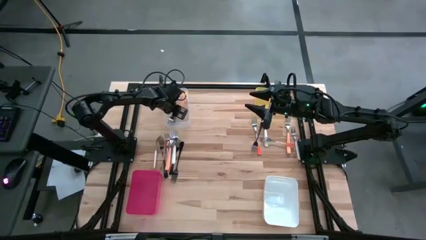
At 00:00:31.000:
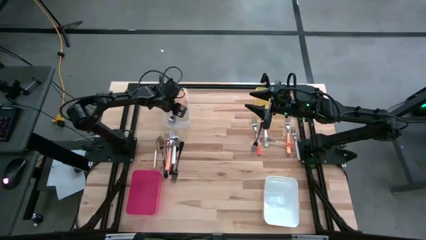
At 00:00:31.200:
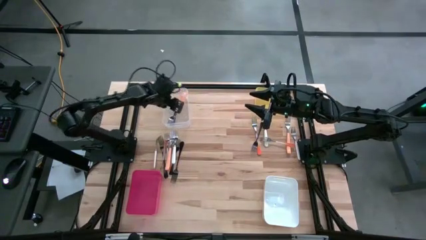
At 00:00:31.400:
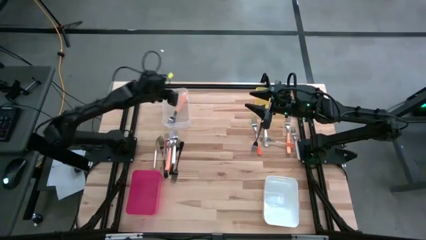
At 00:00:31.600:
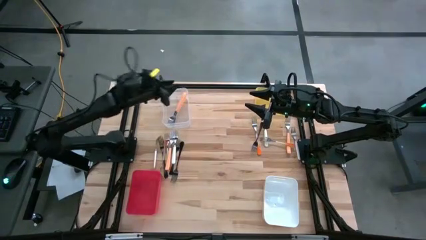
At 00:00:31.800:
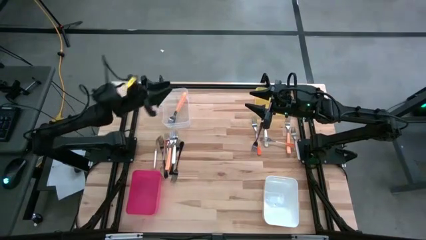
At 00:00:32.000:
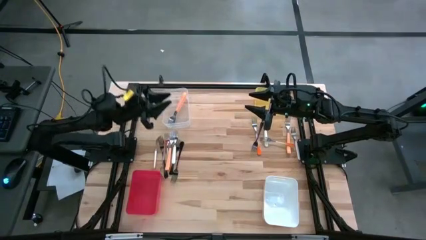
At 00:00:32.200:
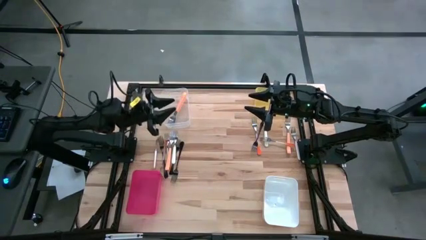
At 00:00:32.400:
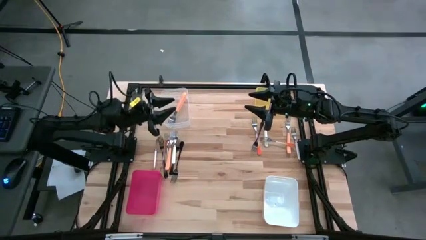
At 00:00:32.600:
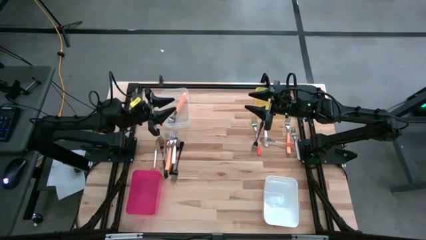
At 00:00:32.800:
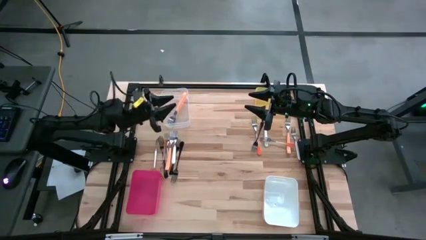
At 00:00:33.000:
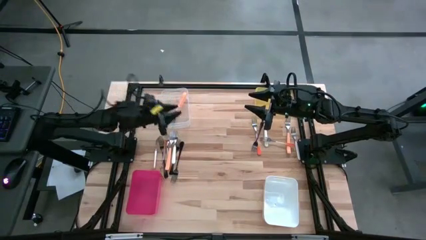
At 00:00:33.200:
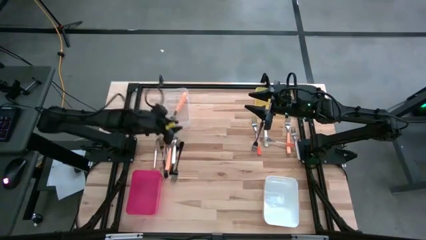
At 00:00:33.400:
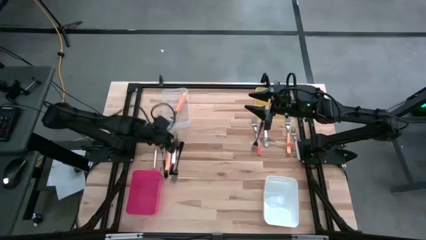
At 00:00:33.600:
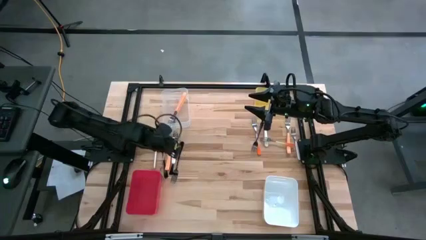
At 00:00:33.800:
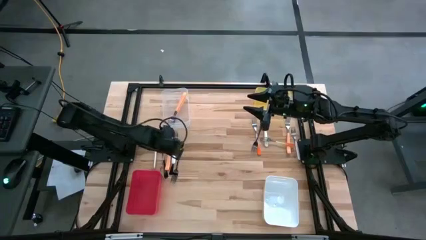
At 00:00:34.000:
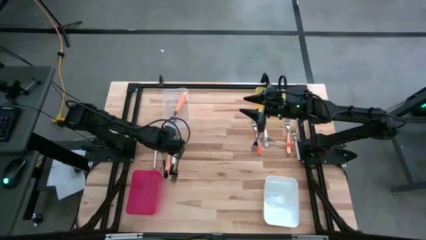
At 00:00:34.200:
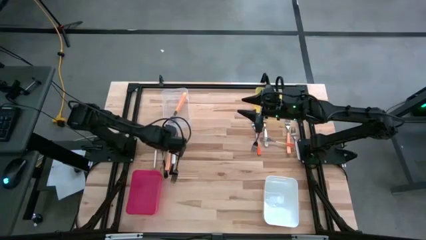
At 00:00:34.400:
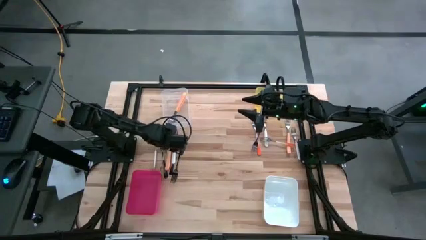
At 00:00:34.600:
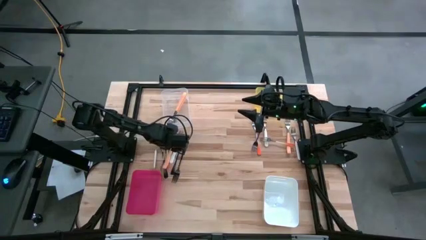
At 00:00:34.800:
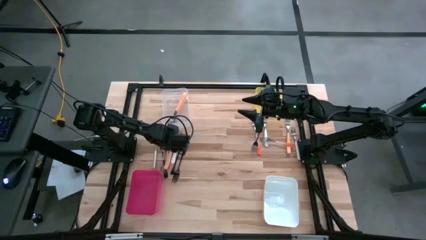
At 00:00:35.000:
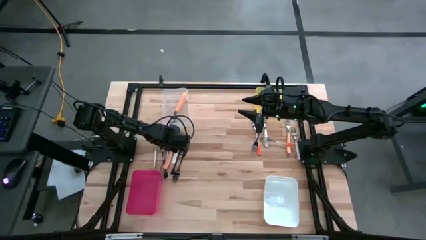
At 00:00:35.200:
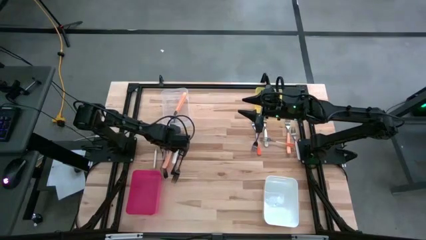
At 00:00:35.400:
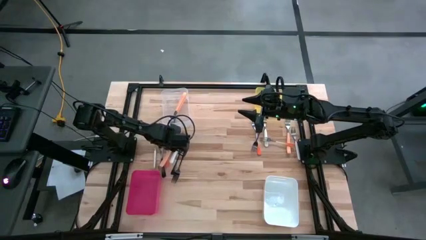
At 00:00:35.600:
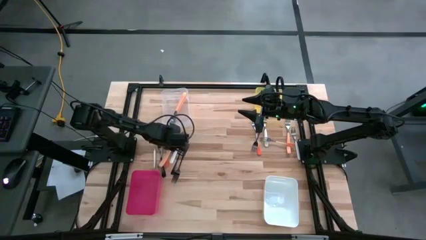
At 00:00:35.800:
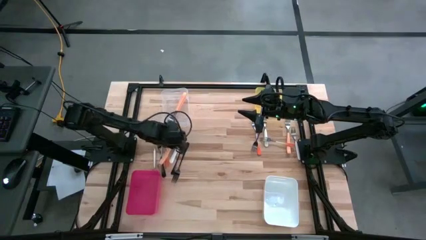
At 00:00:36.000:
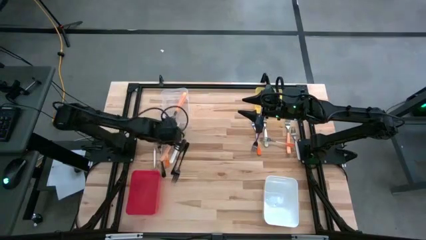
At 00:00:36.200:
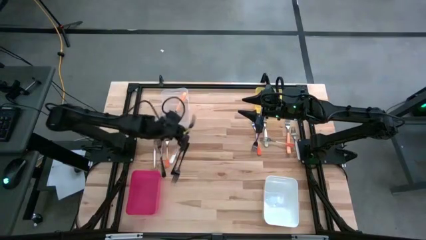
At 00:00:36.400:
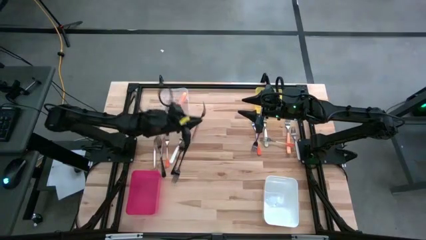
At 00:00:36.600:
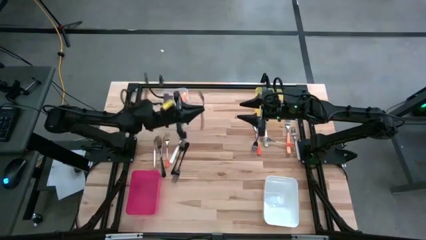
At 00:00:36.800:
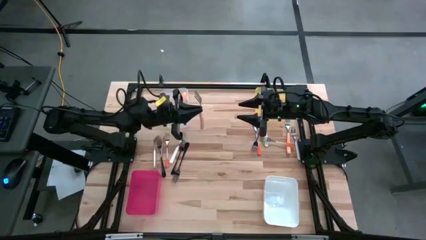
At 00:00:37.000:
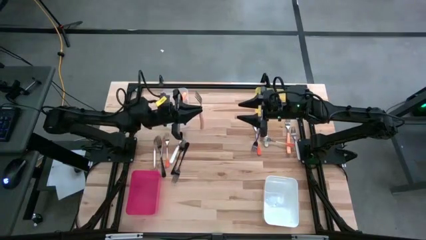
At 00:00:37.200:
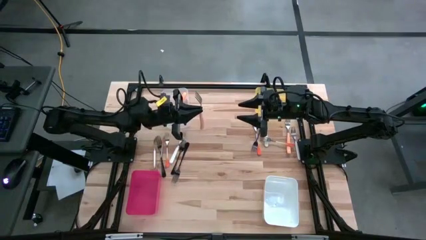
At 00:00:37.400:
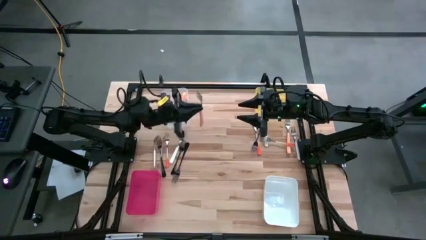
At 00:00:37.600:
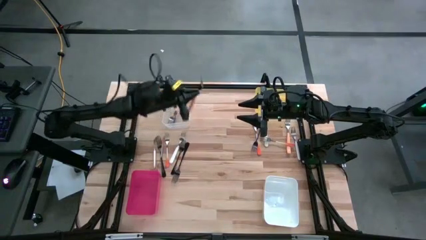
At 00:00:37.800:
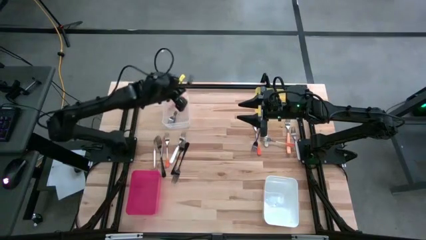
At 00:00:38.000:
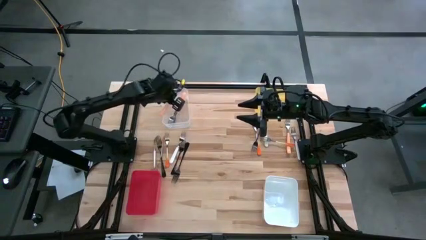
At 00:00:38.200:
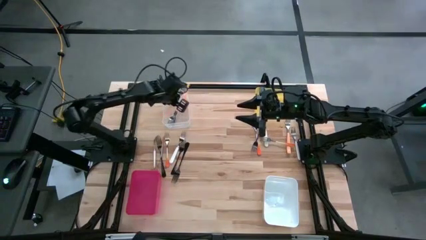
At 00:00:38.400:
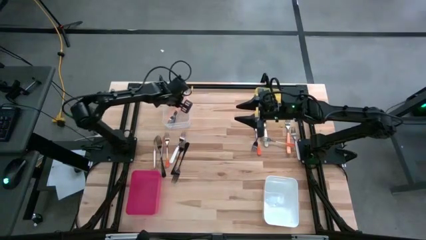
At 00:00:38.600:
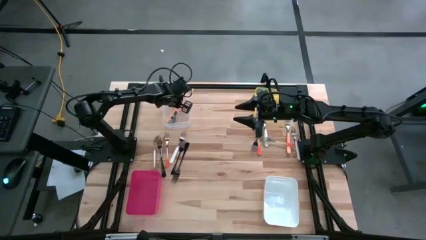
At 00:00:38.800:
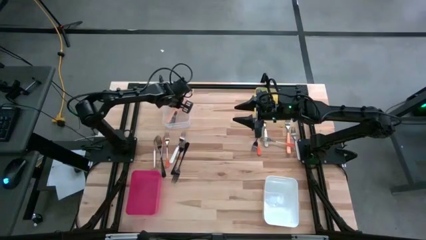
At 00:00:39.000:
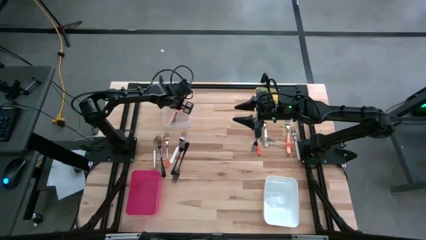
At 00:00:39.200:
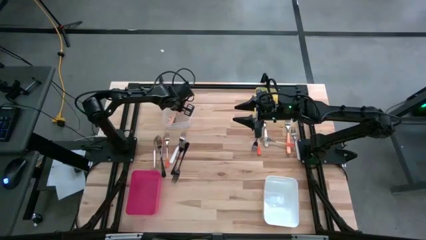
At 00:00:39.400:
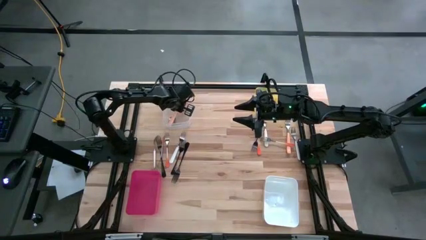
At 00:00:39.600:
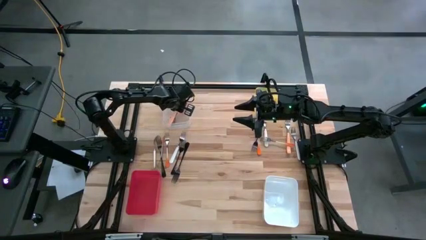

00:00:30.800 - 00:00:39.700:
Task: Sort silverware by color (type)
Put the orange fork into the transparent bin

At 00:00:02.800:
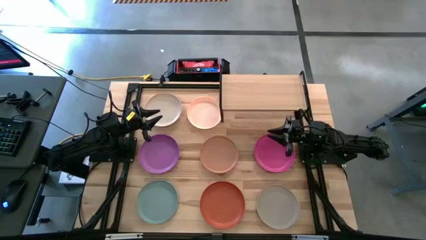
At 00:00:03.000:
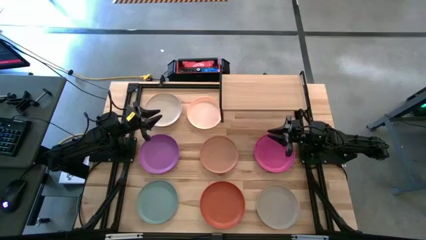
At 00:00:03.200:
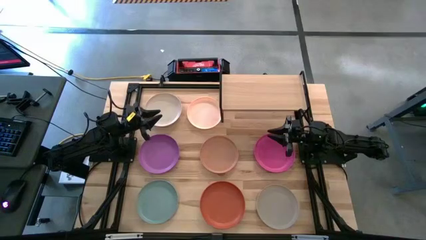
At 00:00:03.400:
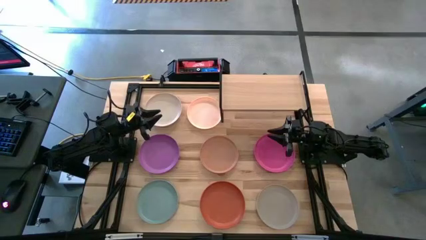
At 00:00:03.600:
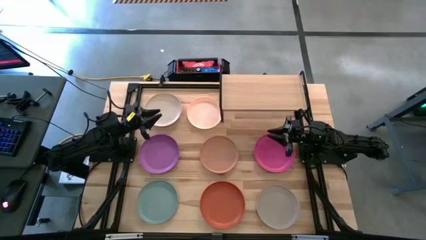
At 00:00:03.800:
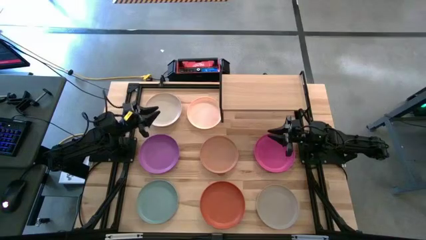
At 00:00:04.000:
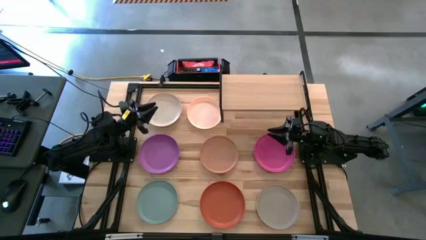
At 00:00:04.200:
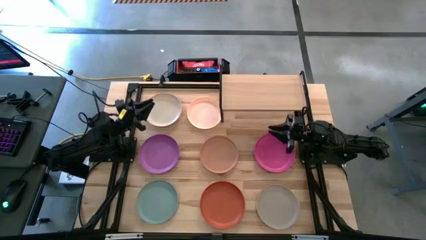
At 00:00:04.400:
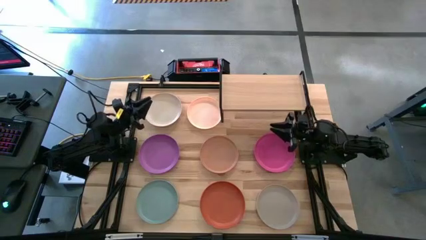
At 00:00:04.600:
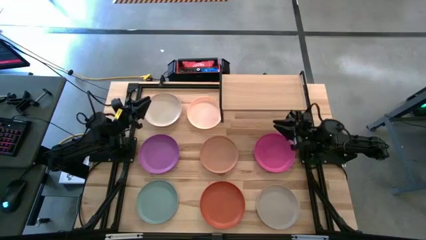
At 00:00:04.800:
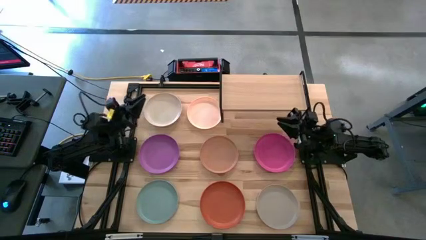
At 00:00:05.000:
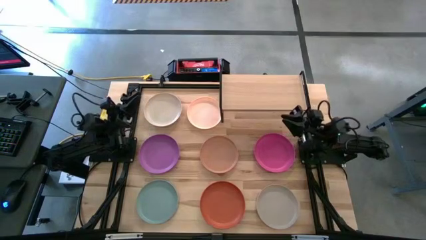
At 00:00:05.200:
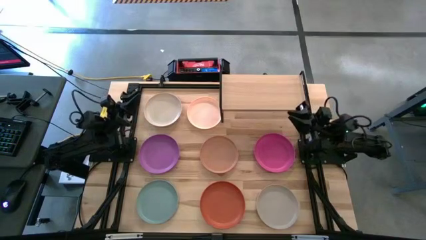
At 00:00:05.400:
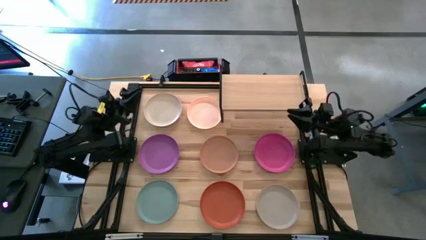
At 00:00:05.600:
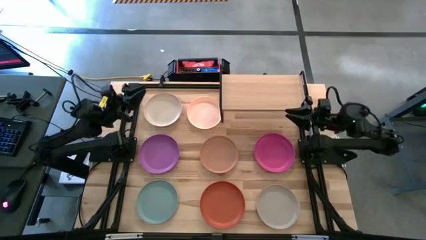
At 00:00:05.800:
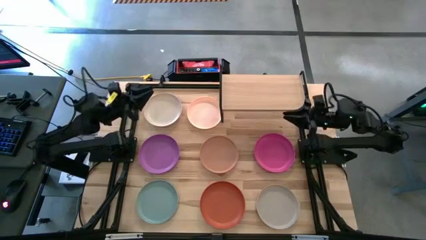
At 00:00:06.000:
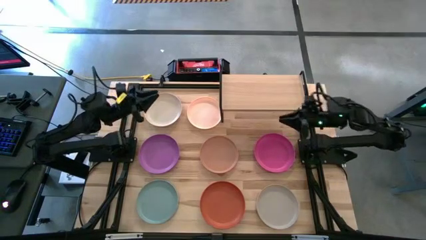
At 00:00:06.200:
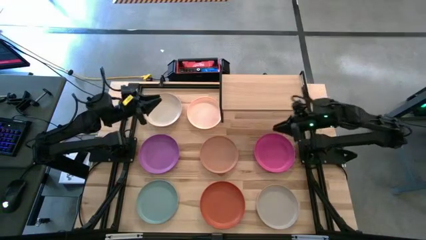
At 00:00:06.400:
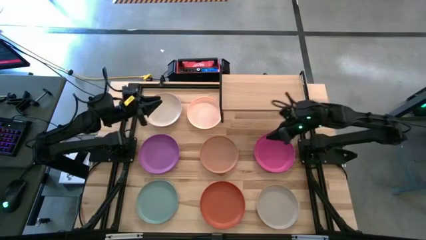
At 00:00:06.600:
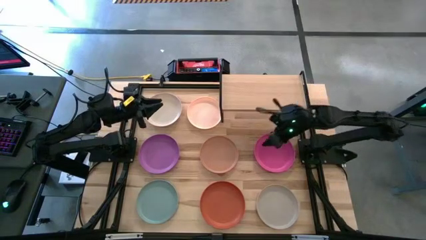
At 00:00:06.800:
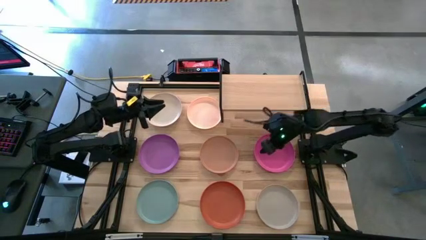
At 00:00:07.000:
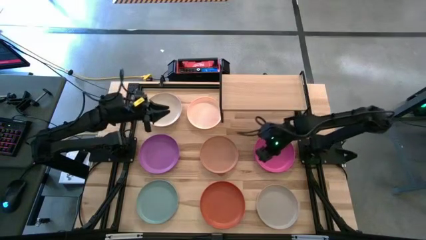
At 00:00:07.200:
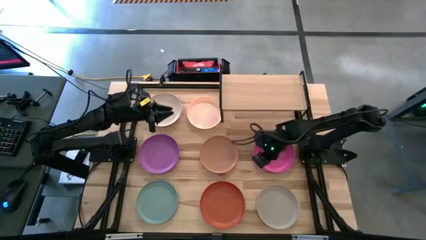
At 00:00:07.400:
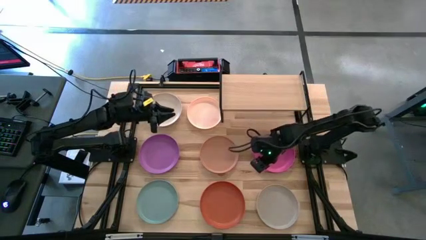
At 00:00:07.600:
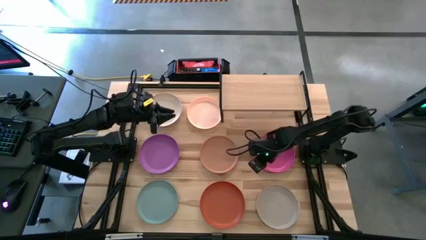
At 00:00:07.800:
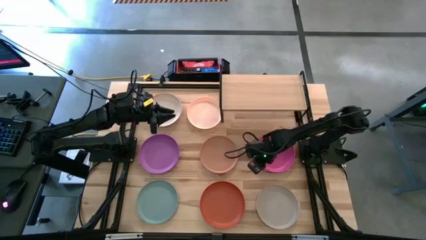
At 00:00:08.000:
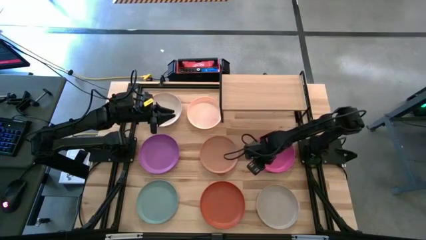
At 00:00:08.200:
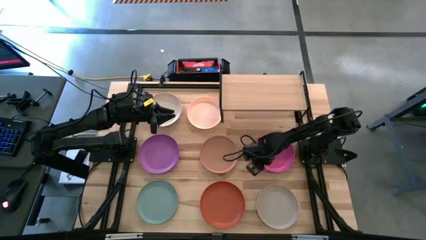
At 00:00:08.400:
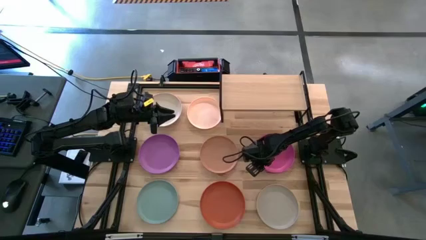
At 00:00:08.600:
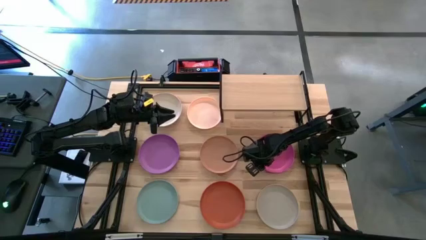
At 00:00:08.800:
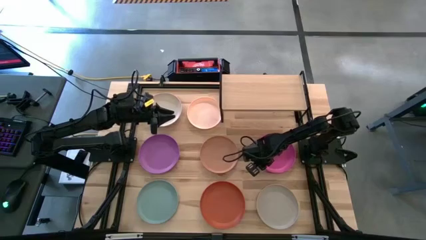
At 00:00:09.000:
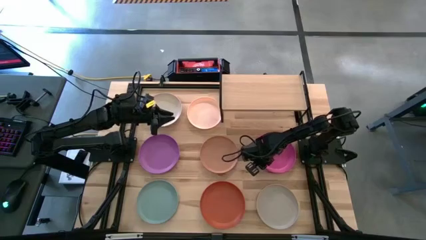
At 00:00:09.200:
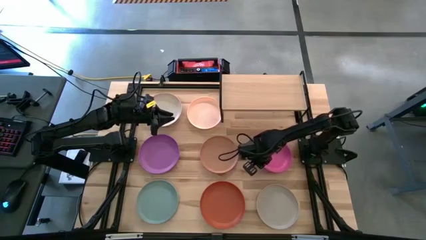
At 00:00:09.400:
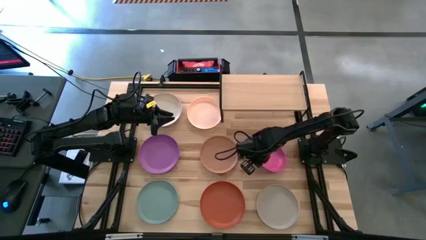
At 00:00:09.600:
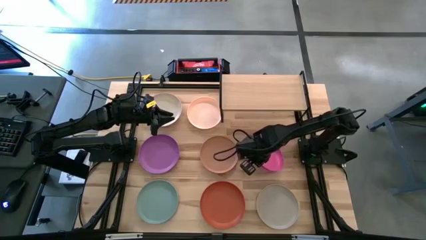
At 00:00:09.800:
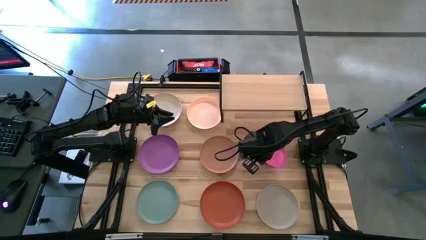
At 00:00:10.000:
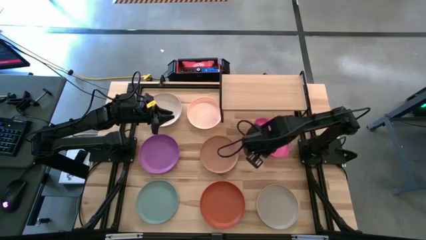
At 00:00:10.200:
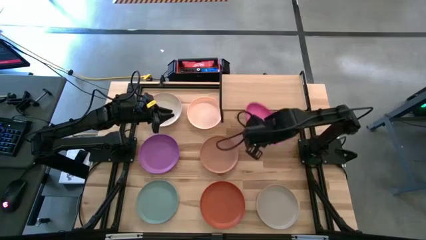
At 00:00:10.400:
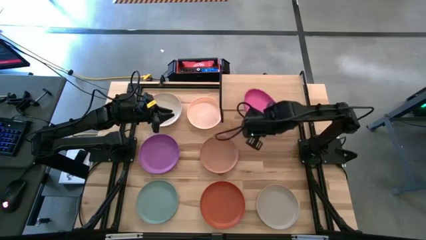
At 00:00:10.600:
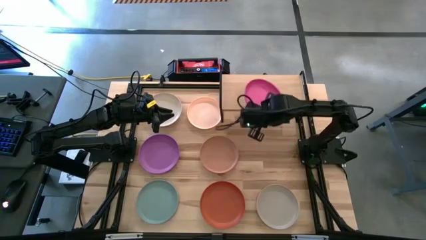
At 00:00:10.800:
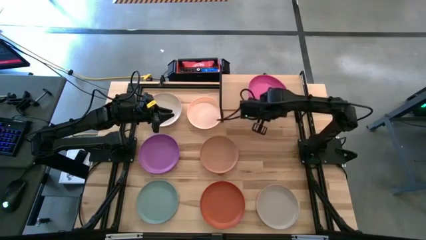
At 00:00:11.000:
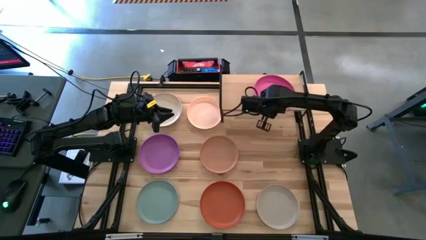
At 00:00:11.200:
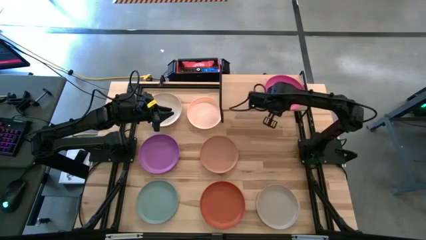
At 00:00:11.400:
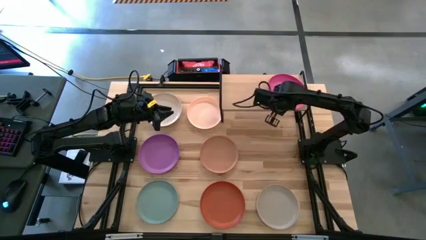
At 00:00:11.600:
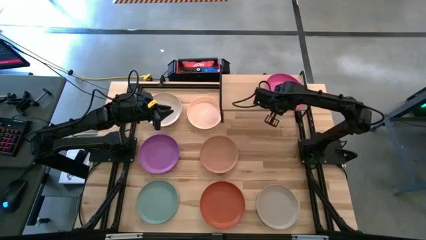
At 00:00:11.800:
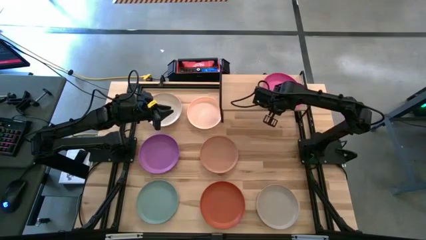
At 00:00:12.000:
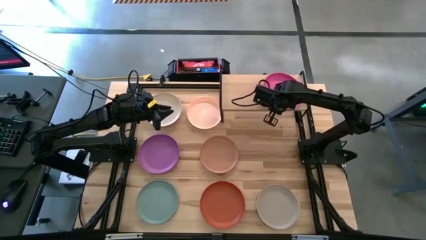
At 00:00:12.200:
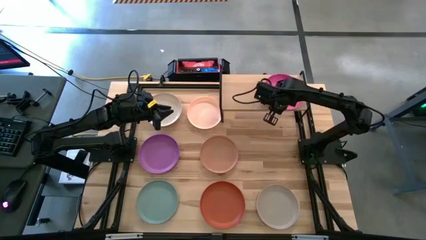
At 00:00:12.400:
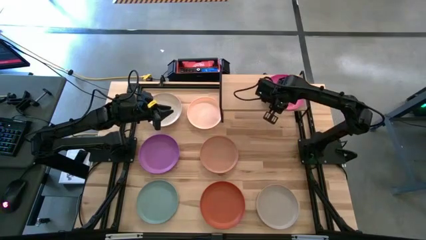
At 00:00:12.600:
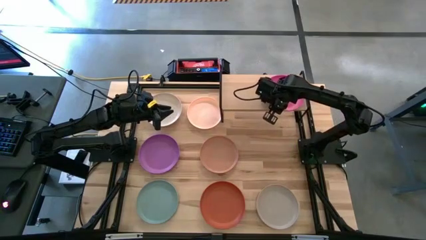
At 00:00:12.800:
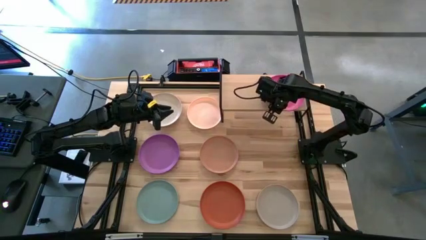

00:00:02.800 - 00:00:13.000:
Task: Place and stack plates onto a shelf
Put the pink plate on the shelf
